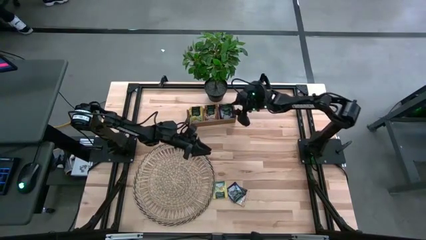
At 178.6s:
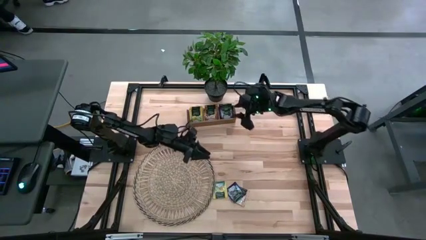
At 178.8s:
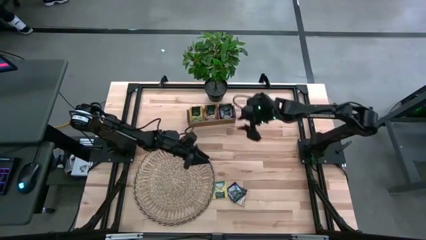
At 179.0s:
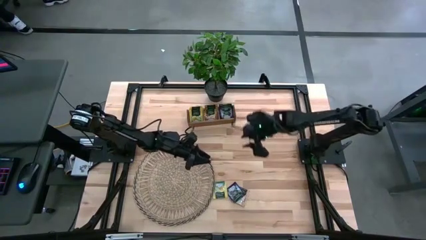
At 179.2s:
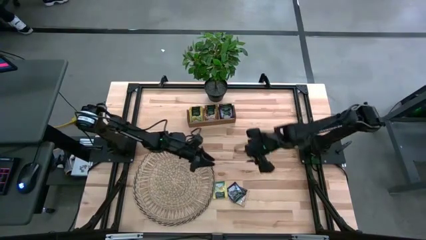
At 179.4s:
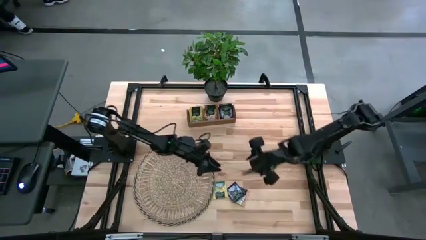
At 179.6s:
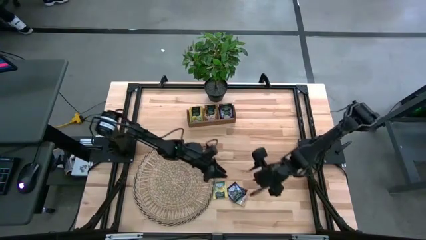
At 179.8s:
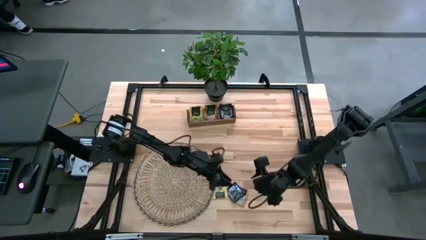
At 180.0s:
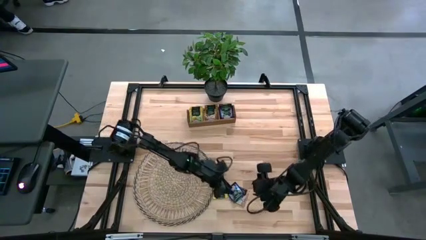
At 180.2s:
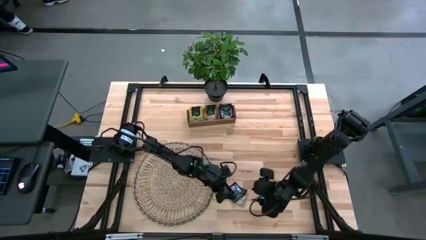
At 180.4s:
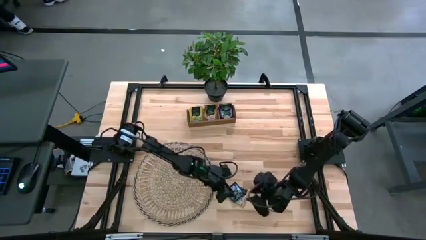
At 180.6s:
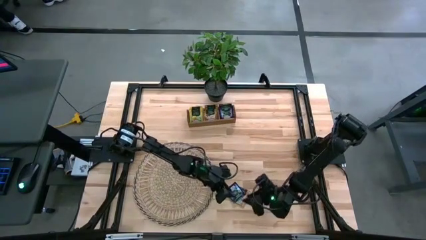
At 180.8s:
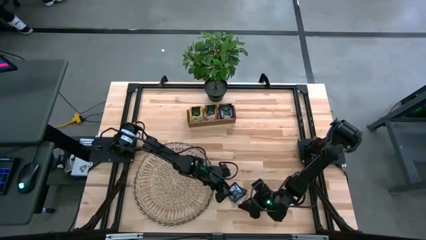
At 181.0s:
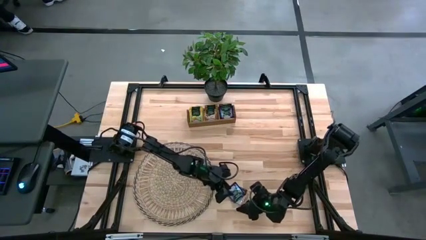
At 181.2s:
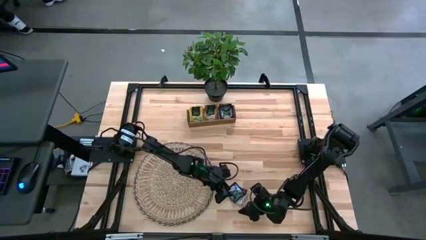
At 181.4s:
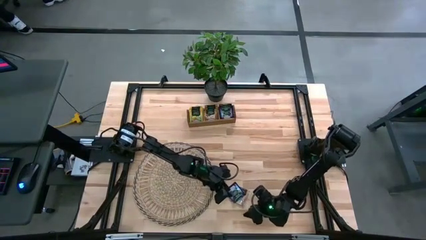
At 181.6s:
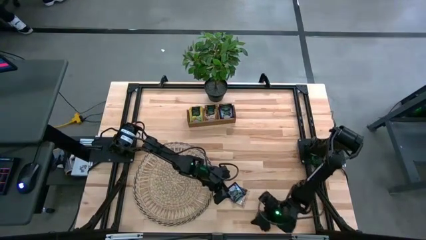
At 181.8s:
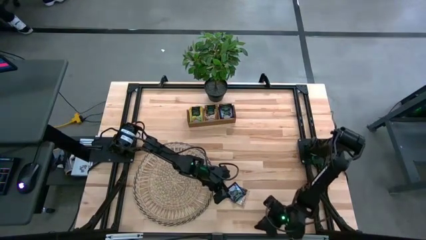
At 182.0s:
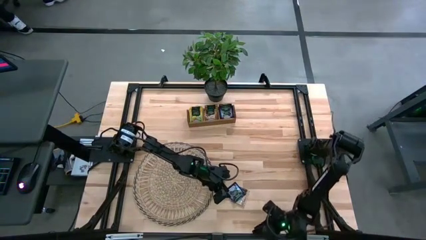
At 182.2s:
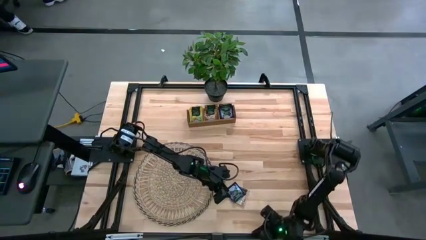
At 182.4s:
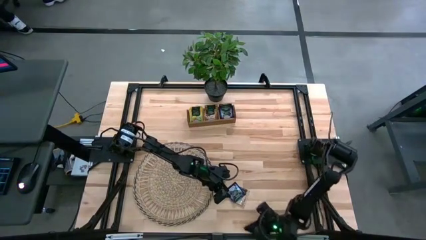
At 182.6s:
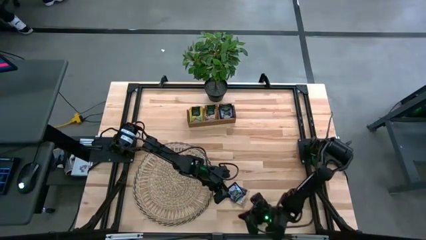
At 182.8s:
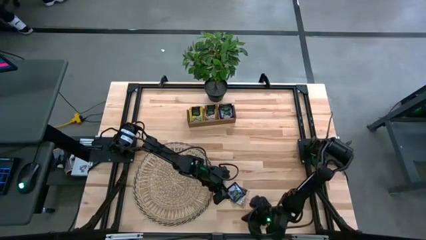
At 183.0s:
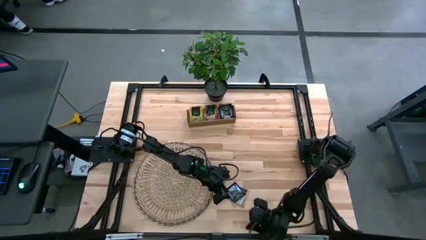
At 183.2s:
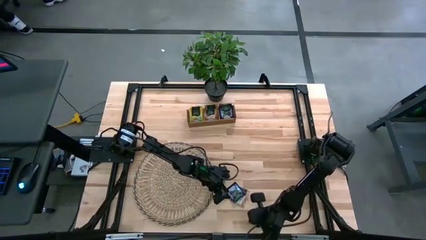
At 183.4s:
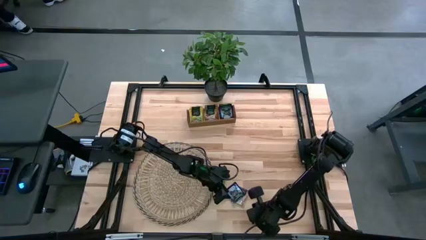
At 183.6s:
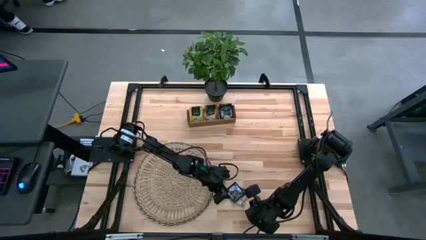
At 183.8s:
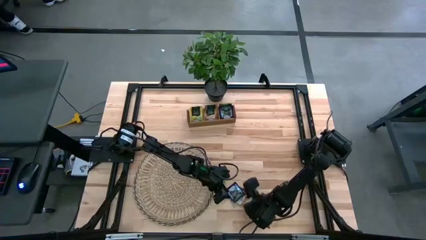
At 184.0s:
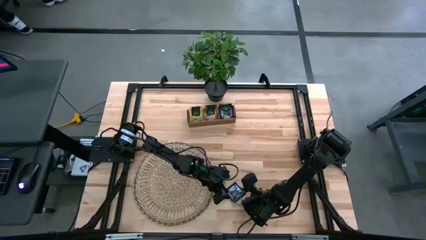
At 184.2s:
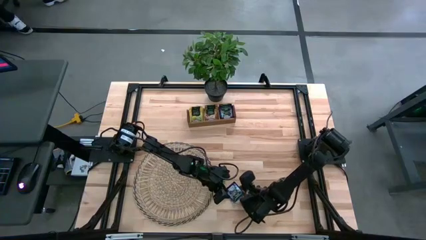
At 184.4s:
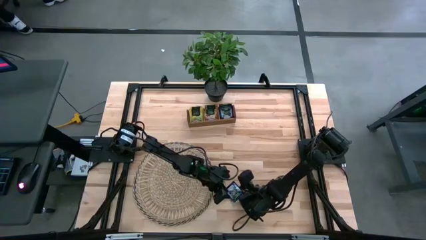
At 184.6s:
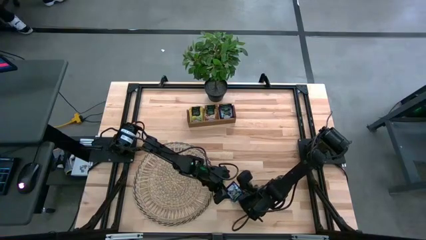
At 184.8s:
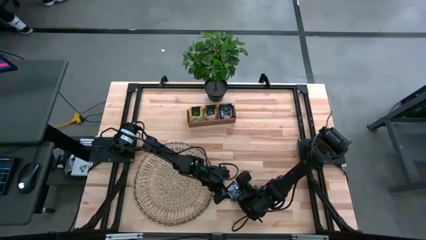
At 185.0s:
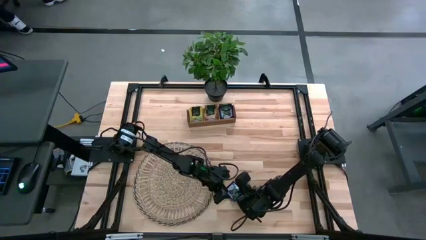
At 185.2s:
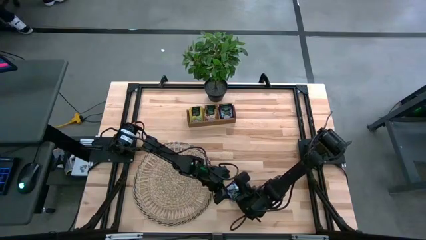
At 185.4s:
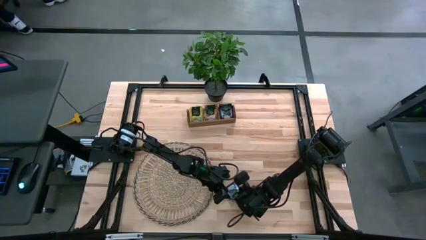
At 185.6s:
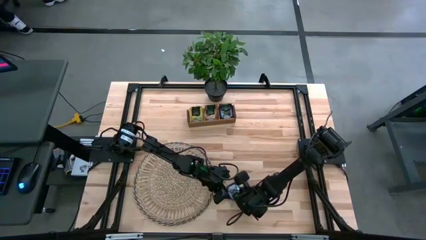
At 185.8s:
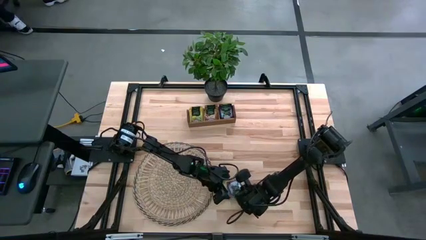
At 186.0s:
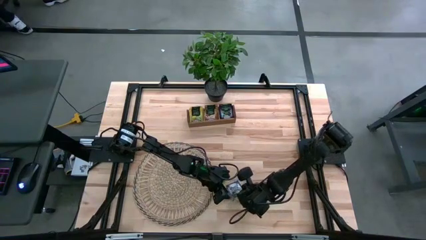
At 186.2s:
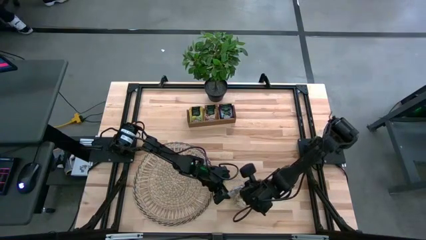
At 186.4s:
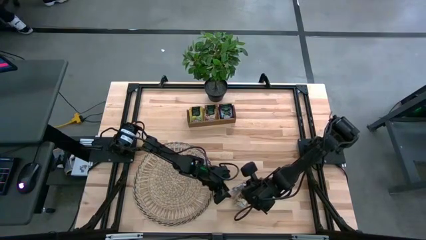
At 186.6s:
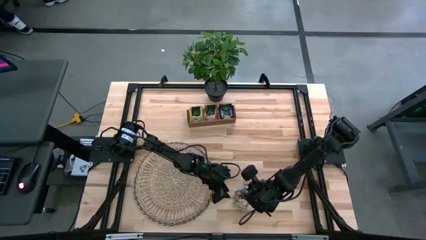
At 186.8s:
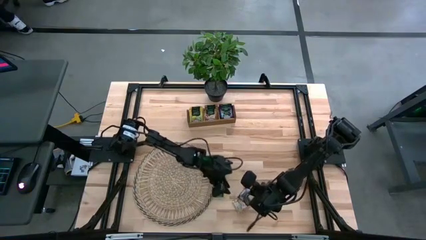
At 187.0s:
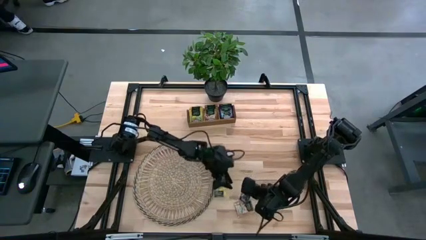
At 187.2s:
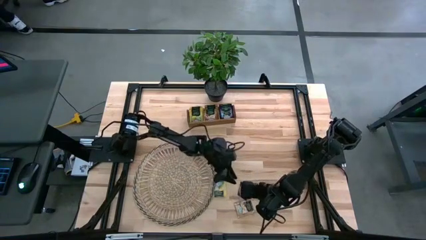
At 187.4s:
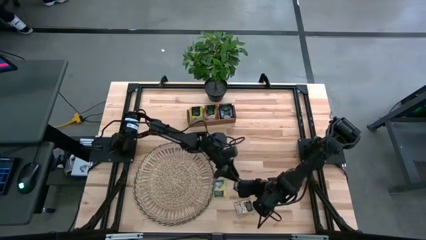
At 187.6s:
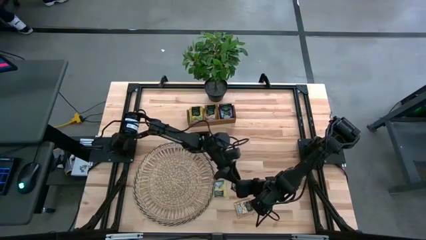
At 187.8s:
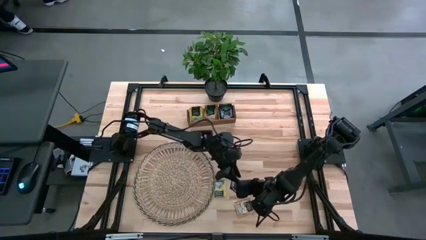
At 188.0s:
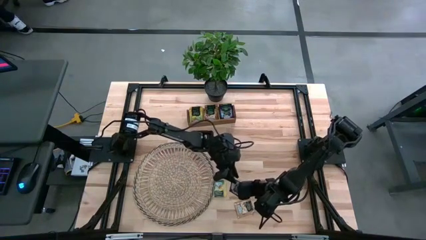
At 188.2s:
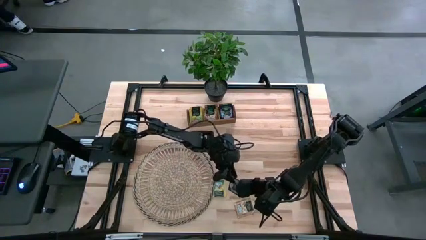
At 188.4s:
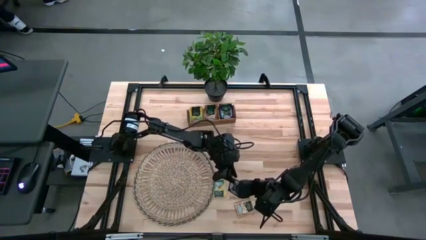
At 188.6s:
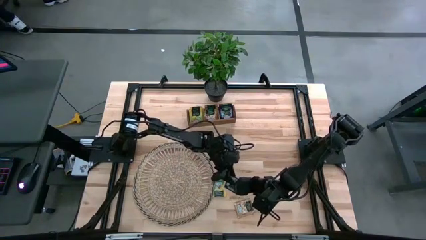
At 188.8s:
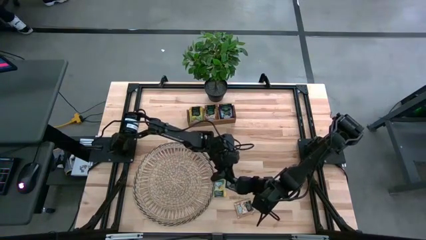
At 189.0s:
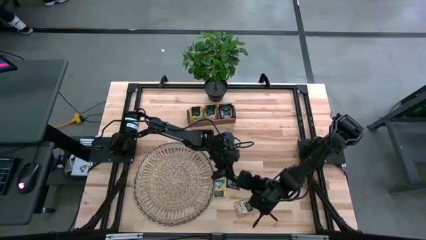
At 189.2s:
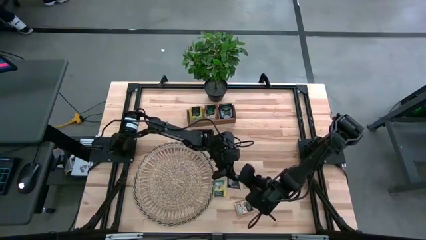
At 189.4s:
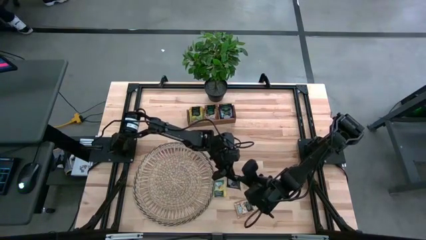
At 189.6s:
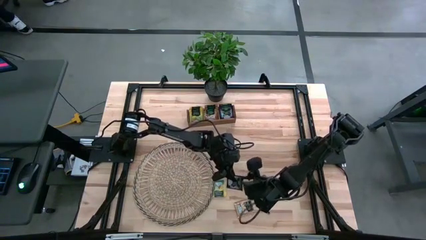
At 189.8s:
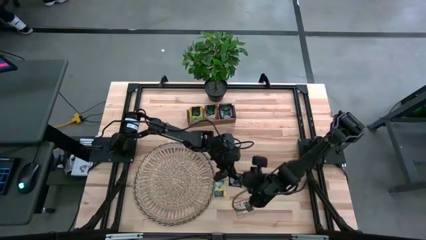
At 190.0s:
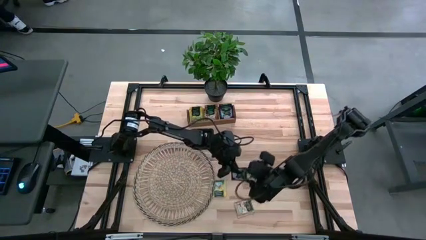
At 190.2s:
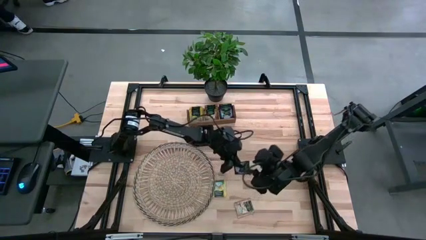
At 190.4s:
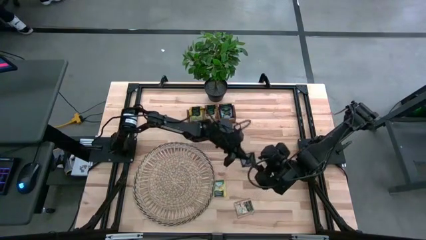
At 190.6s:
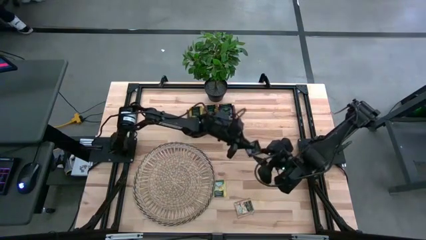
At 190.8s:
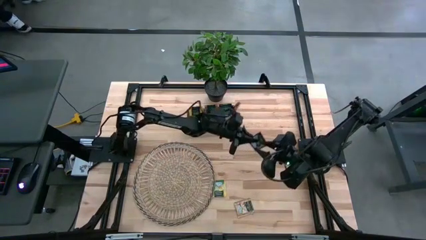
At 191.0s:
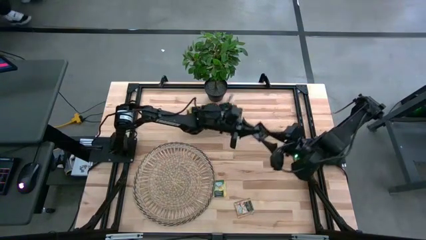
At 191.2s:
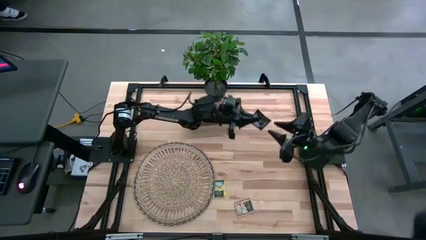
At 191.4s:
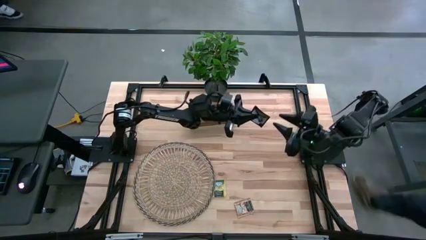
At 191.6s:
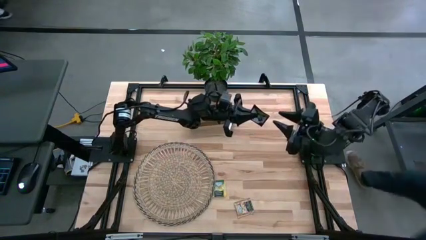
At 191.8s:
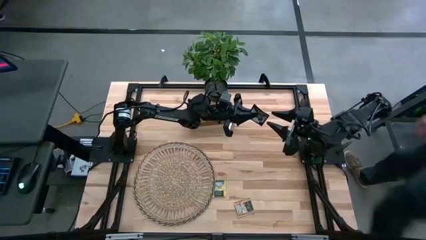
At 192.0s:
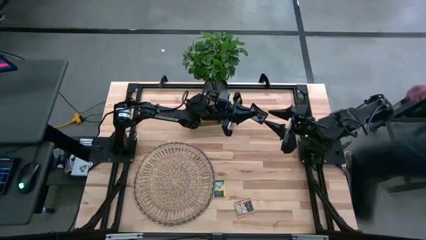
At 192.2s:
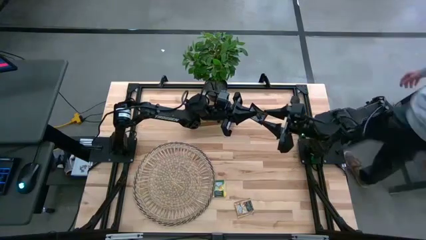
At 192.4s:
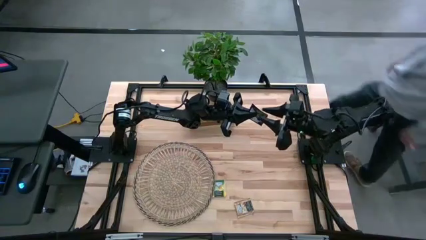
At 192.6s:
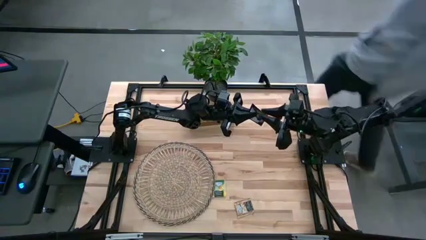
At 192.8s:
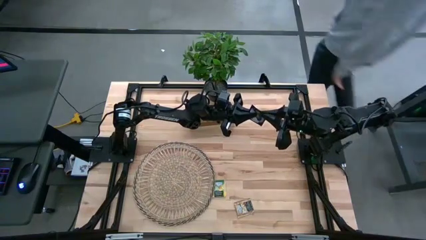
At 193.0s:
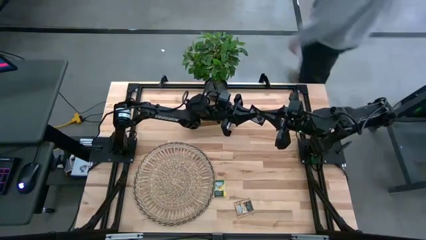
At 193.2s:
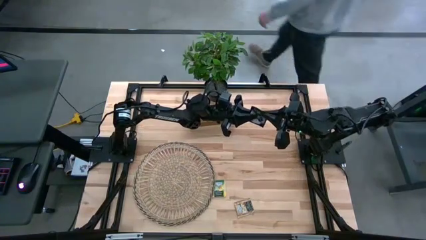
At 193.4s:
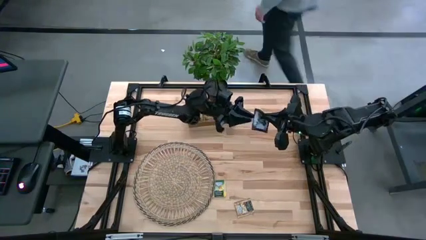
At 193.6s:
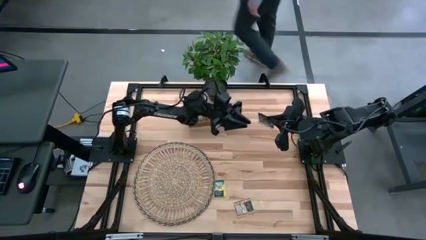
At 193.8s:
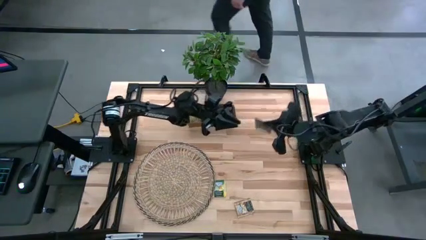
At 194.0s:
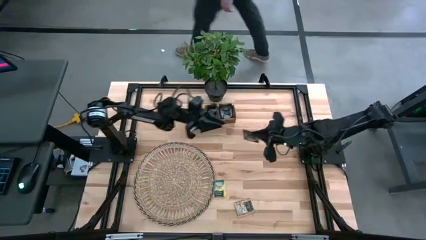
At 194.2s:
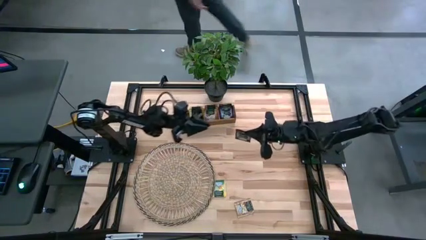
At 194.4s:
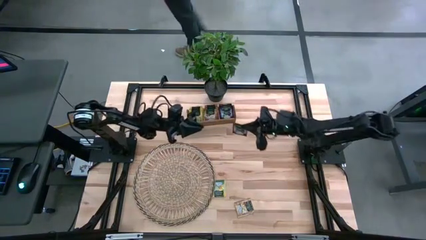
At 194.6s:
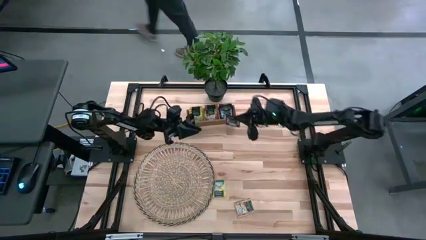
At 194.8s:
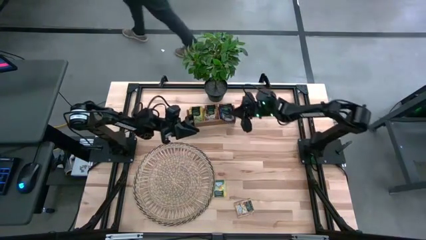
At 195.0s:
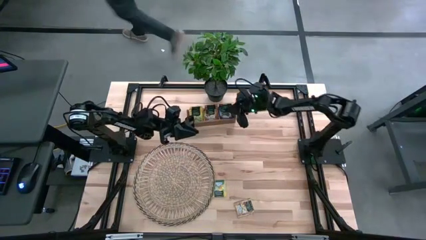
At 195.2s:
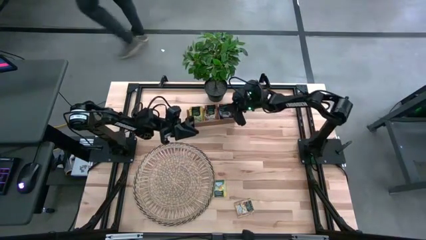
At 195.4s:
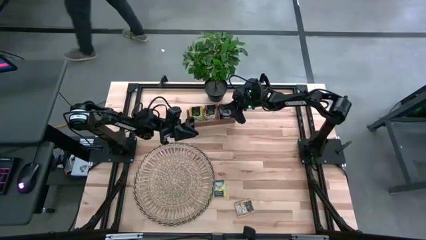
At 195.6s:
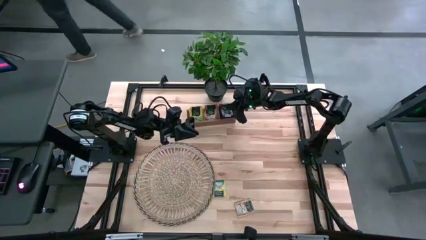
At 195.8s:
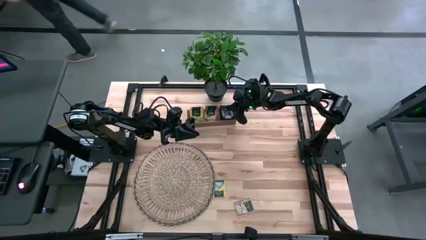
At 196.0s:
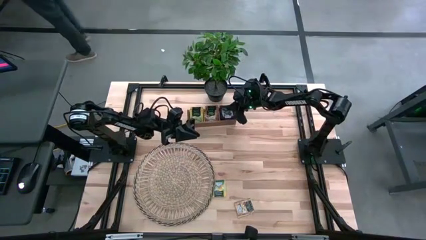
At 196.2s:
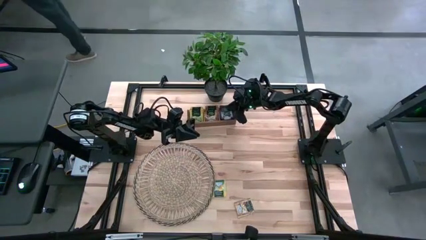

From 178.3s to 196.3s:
Task: Pick & Place Tea
Put the blue tea bag into the right section of the wooden organizer
